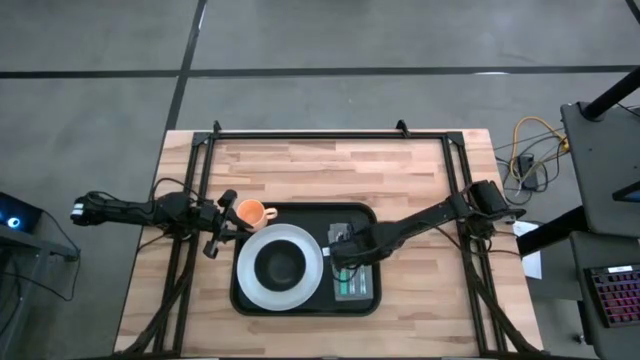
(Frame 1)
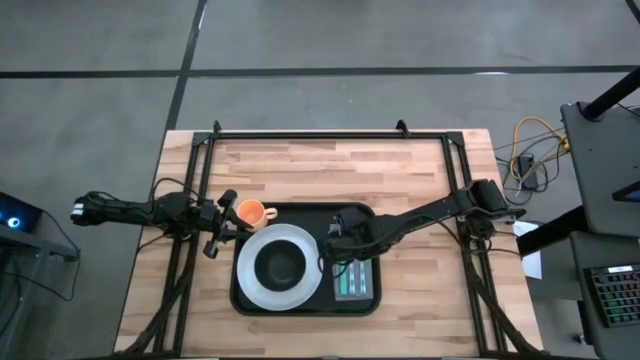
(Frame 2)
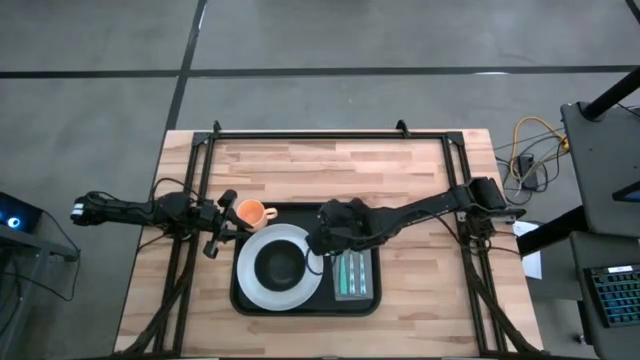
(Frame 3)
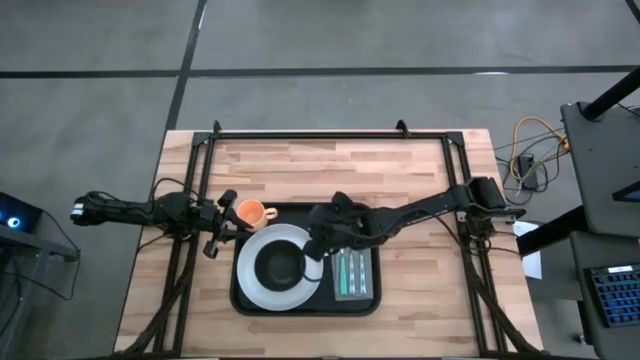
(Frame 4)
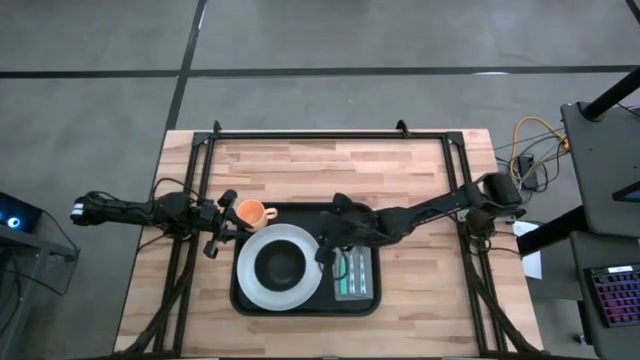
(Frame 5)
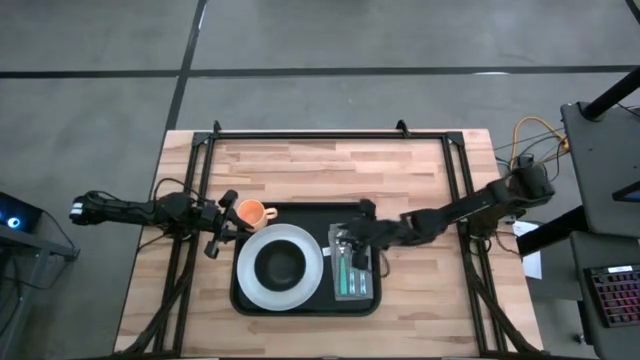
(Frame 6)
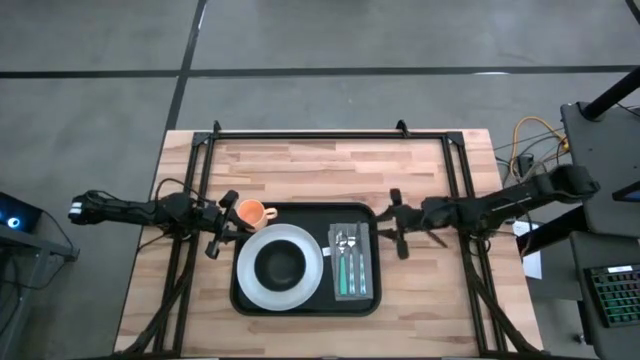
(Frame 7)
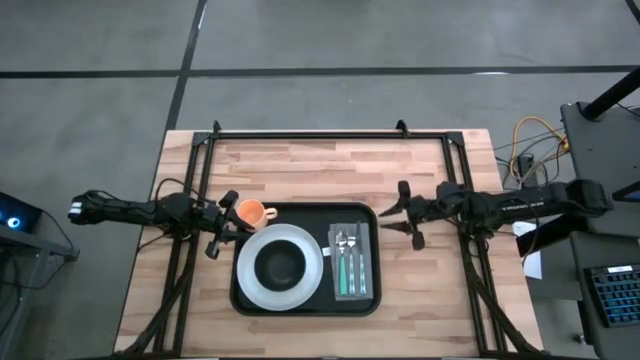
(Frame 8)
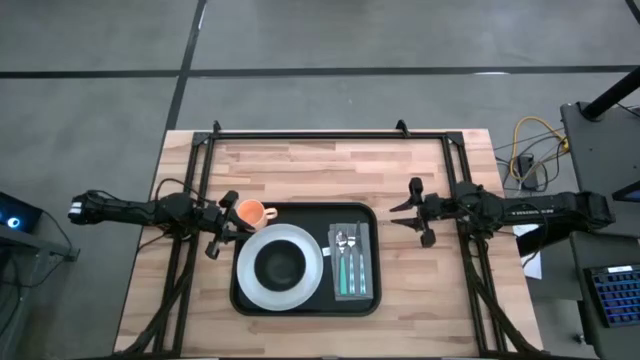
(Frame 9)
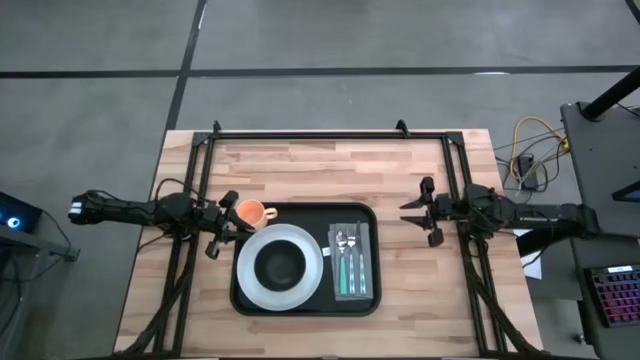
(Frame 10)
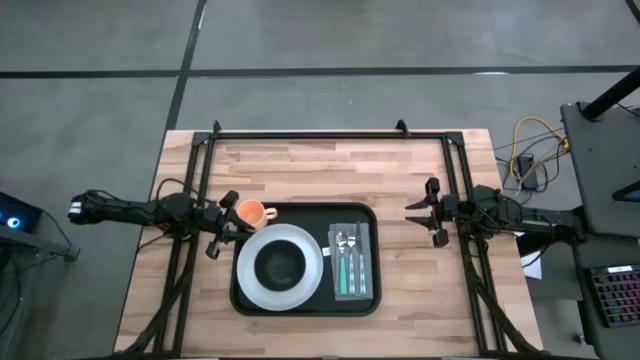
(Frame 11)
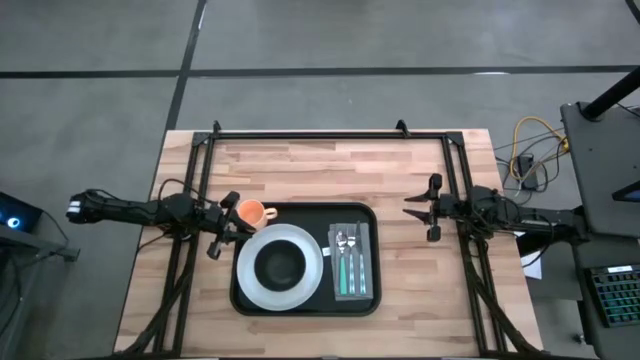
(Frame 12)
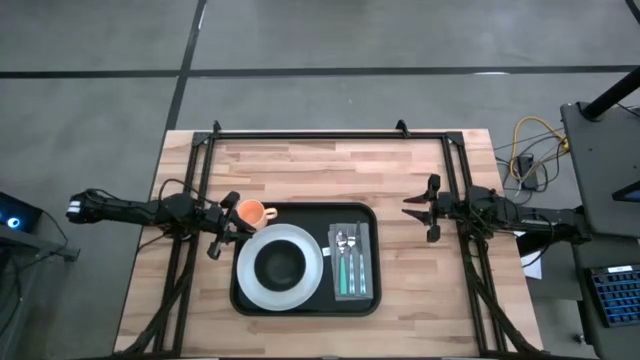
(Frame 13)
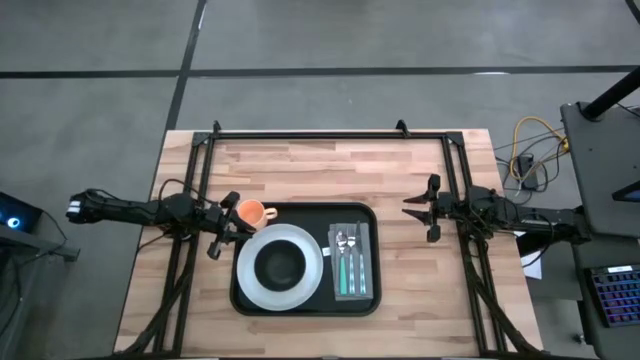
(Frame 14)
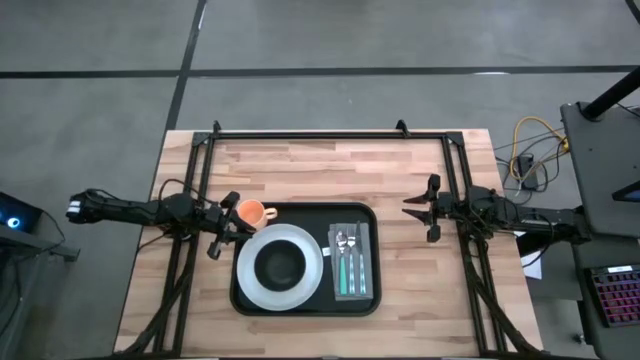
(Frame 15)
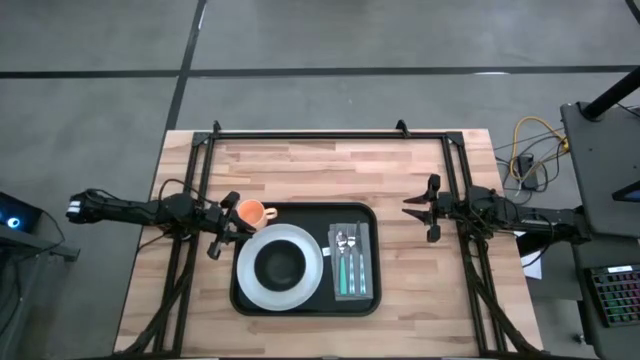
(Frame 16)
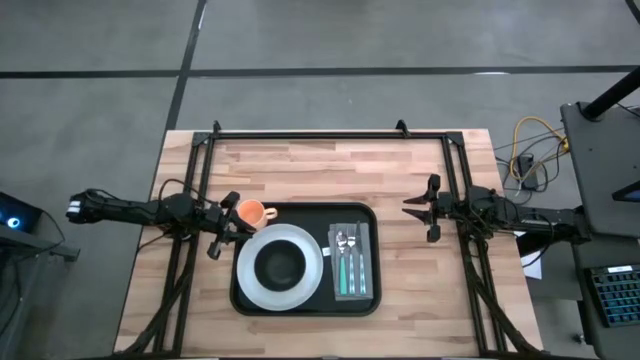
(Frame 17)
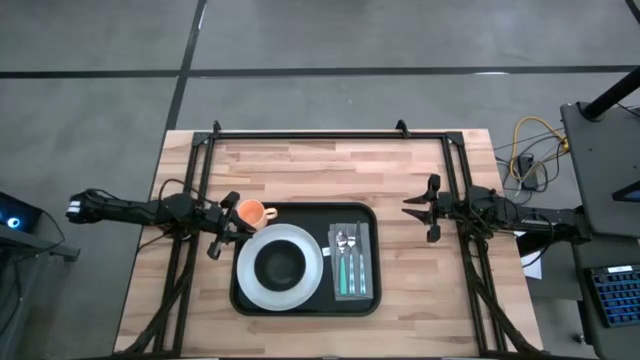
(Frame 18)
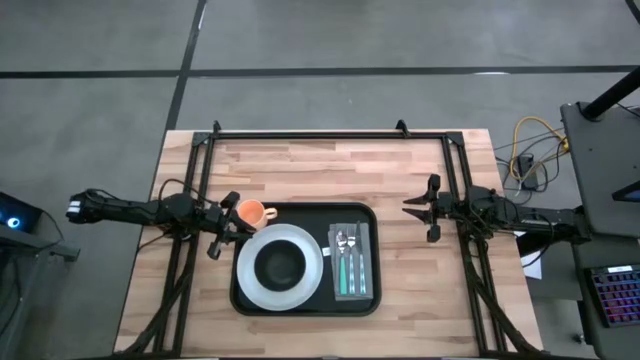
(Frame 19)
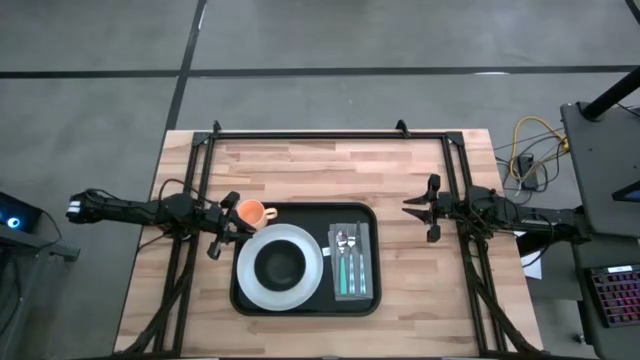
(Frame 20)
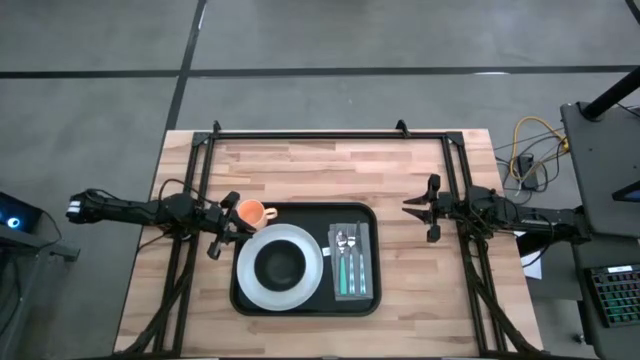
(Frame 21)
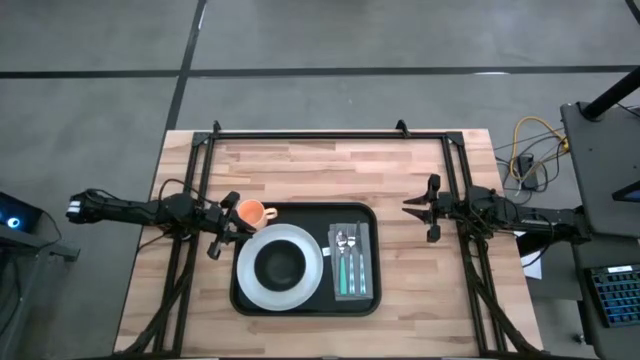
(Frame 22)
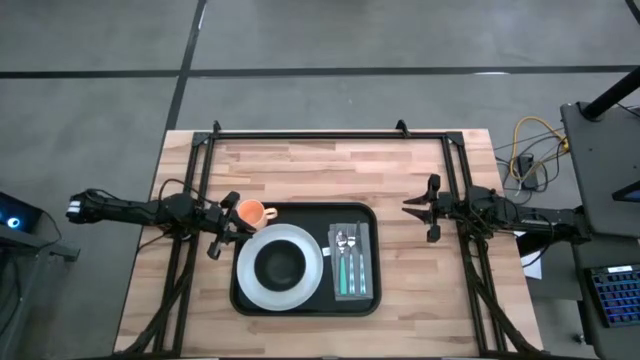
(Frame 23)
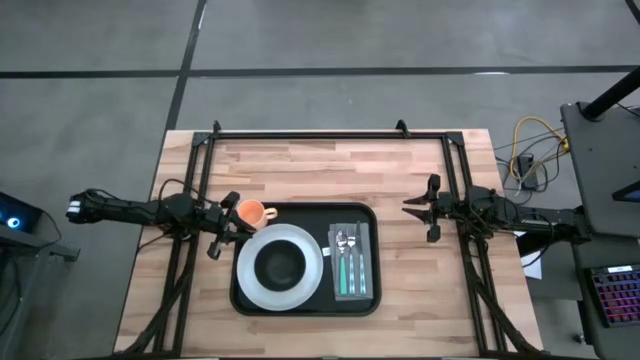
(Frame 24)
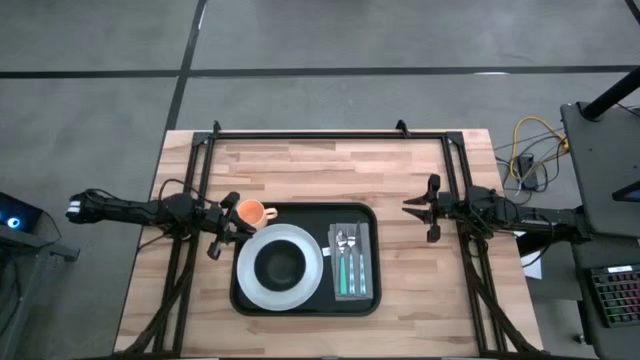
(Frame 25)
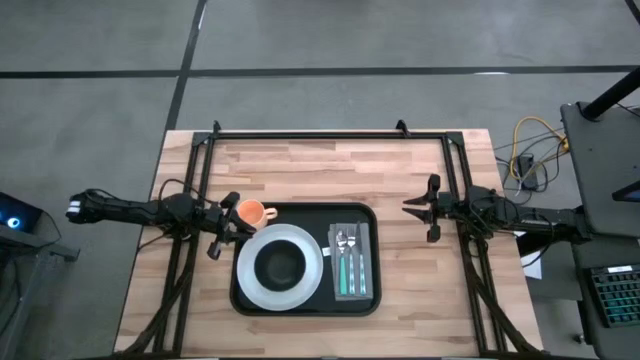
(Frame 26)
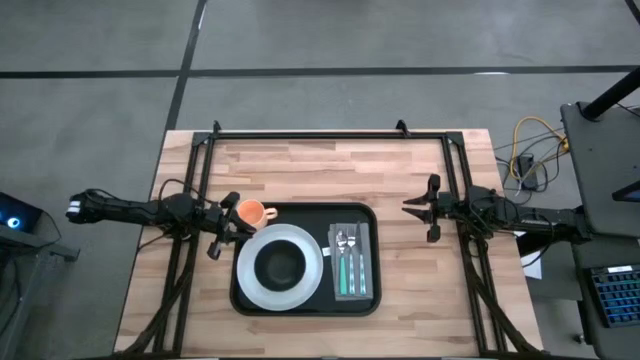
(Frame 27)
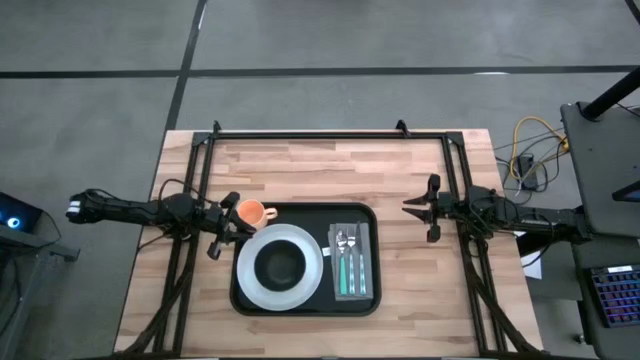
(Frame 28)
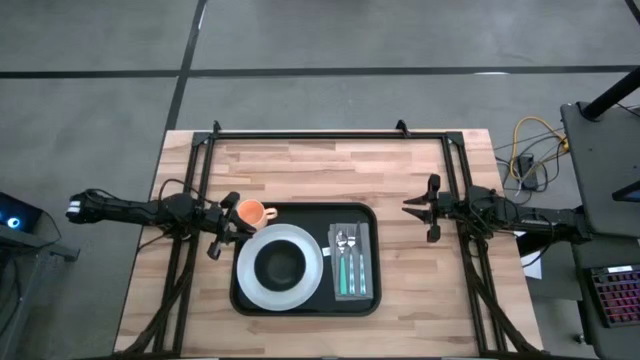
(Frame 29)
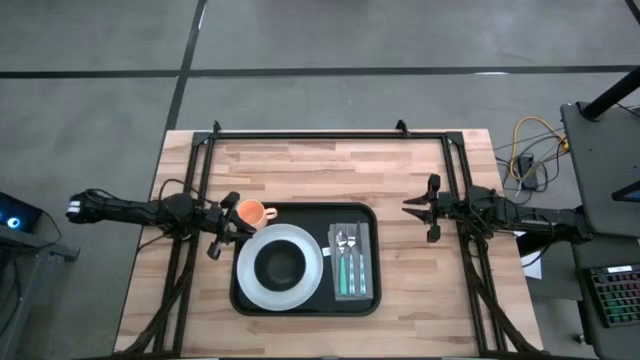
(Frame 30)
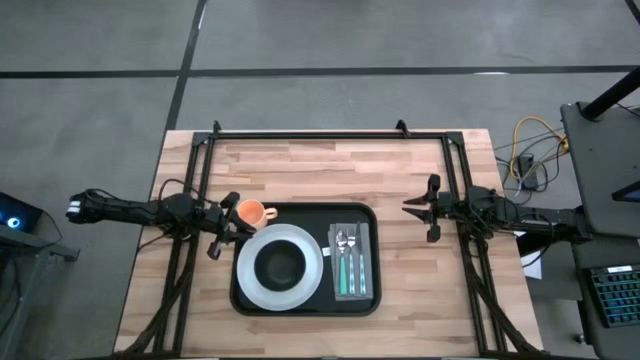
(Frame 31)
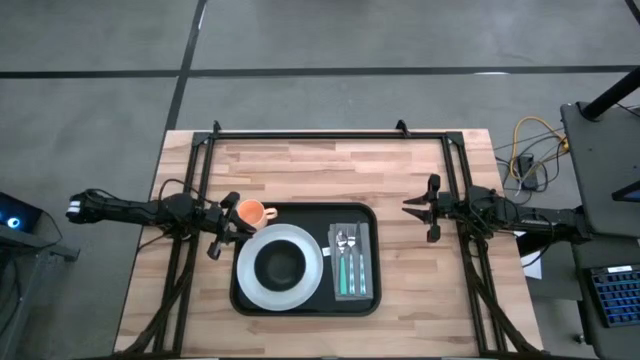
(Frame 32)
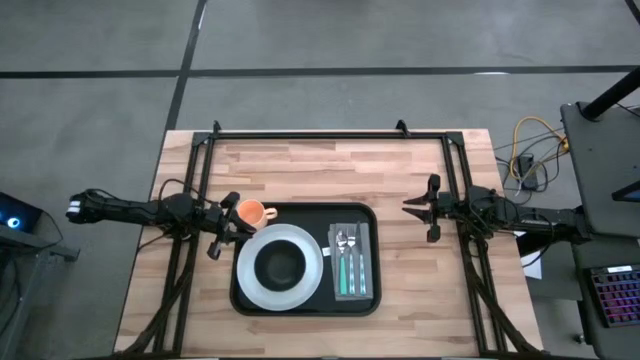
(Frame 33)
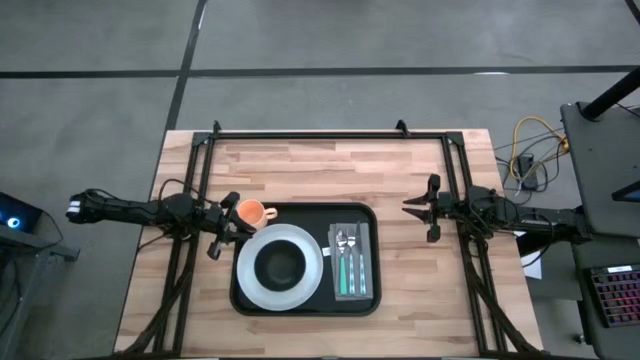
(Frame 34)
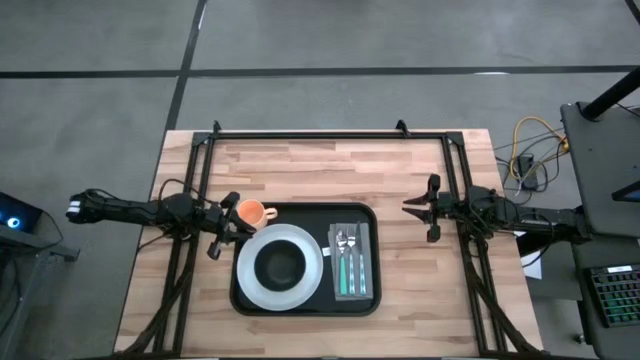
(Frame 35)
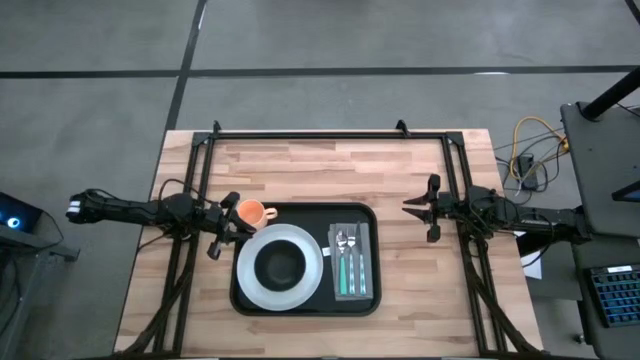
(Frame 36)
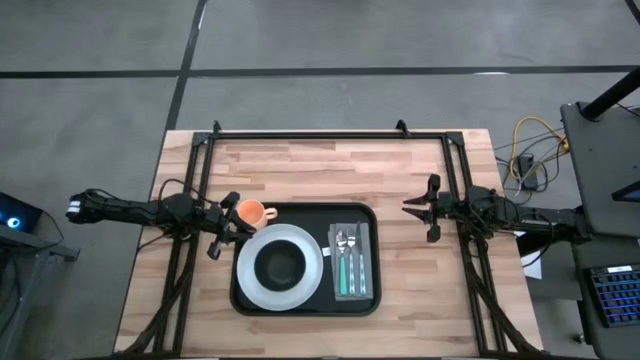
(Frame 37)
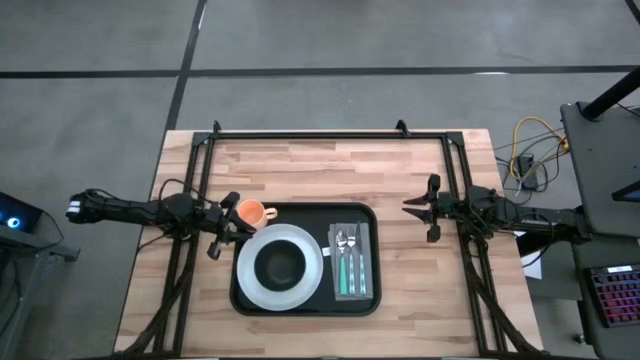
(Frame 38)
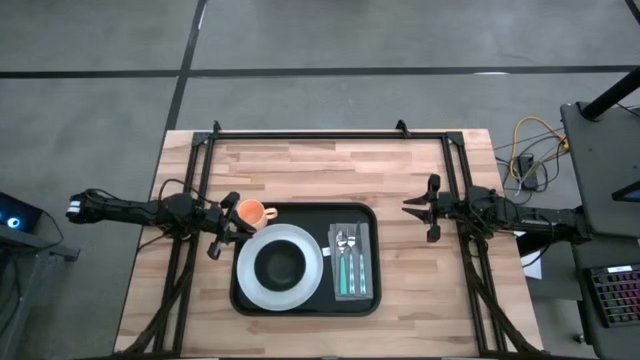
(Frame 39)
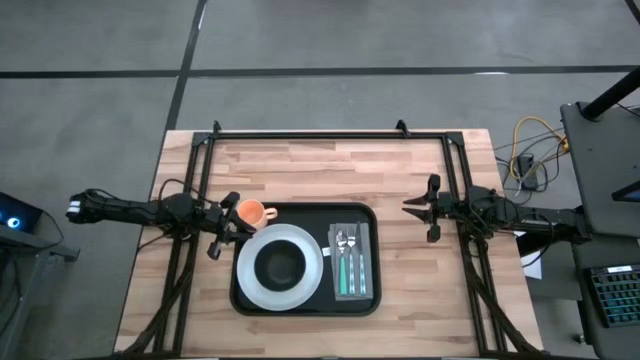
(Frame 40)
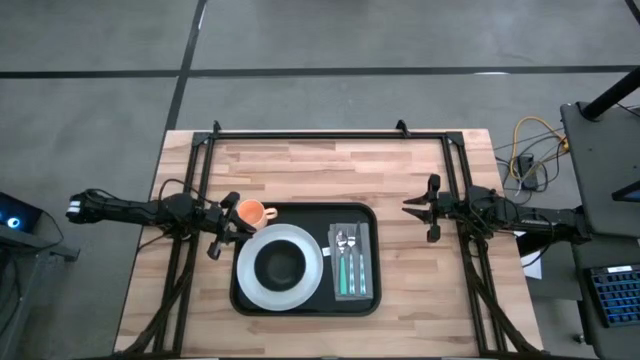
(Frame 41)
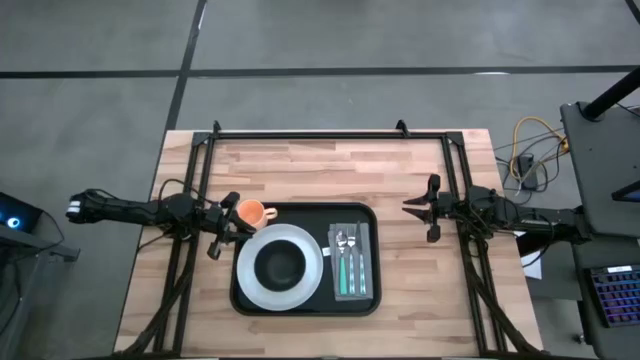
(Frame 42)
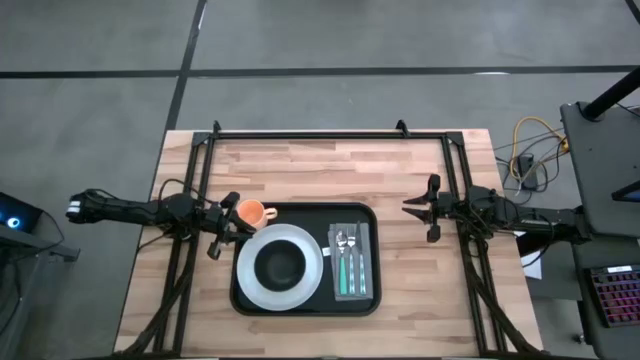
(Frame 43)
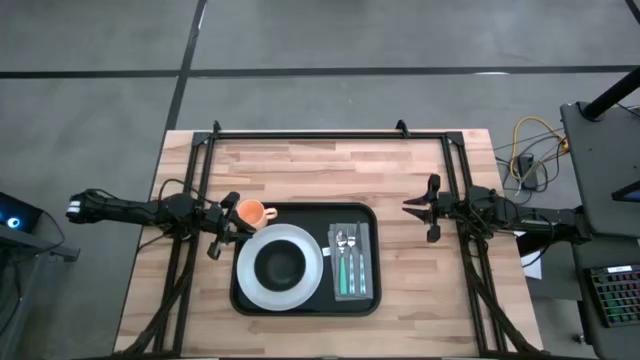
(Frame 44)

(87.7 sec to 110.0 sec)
Task: Set up tray
Return to Home Position
